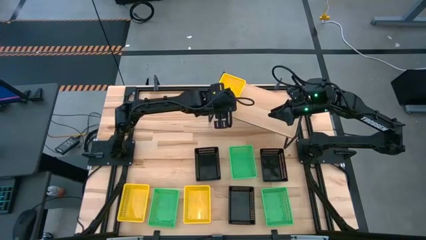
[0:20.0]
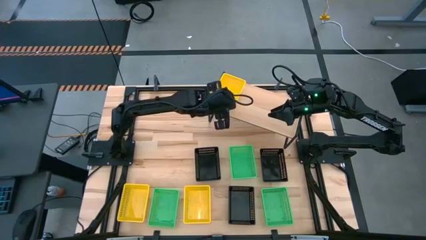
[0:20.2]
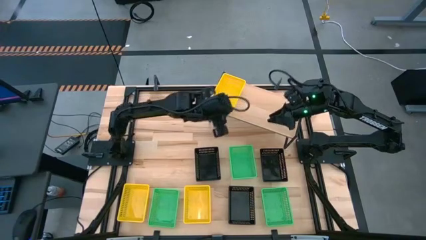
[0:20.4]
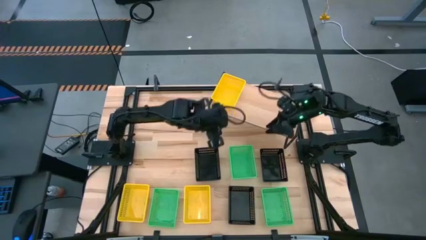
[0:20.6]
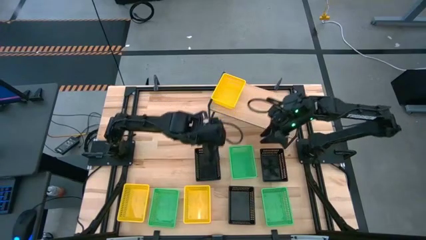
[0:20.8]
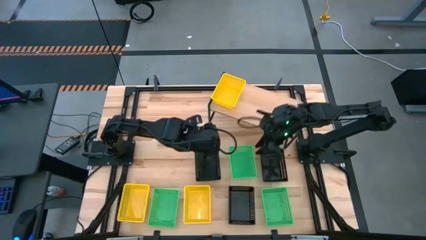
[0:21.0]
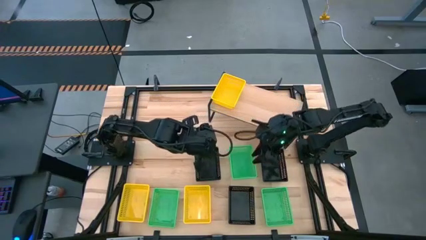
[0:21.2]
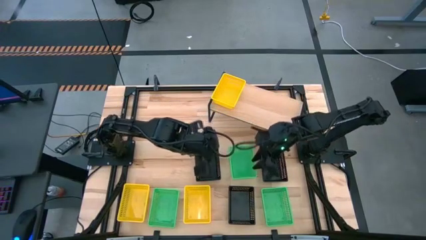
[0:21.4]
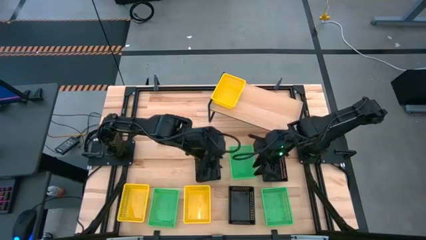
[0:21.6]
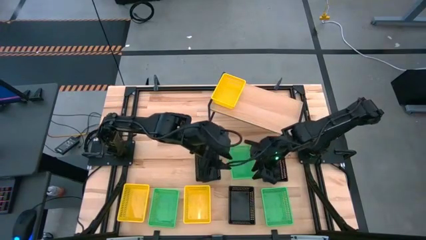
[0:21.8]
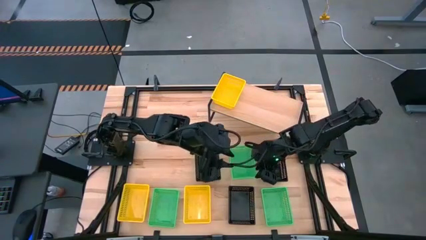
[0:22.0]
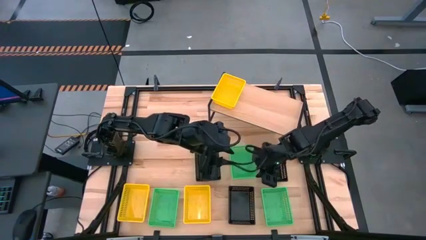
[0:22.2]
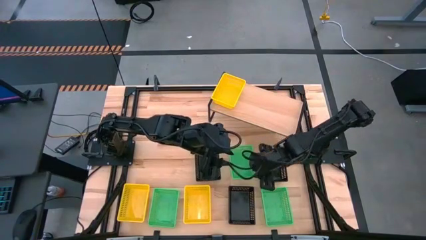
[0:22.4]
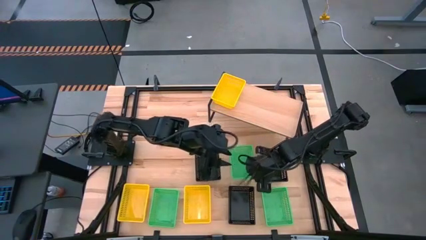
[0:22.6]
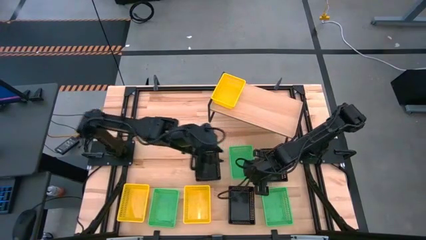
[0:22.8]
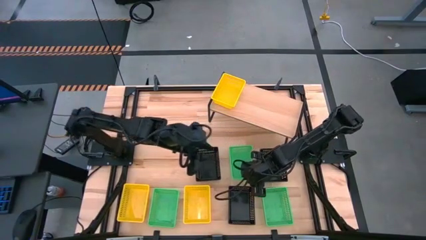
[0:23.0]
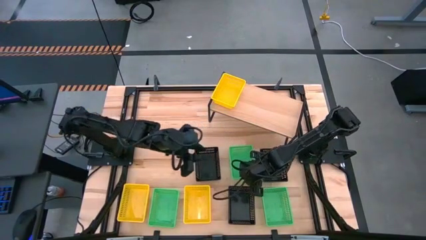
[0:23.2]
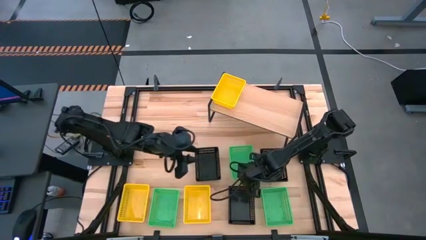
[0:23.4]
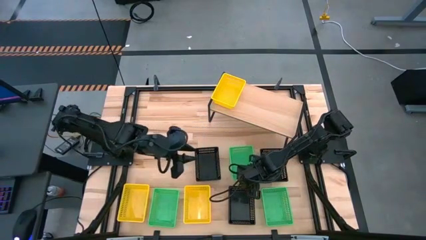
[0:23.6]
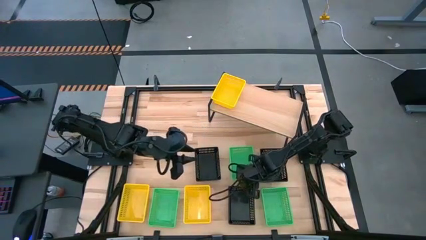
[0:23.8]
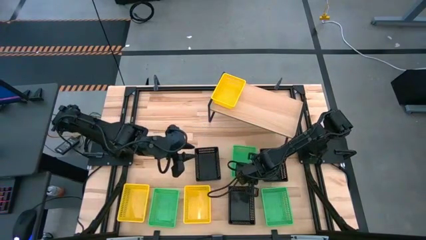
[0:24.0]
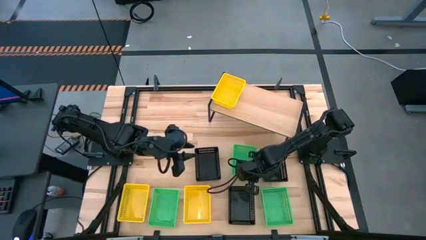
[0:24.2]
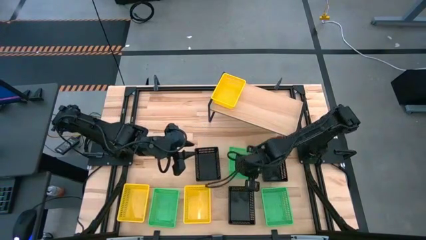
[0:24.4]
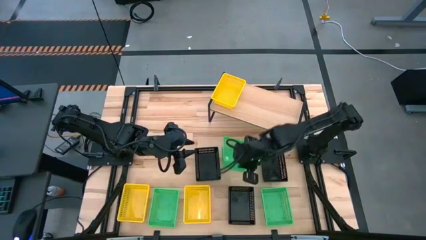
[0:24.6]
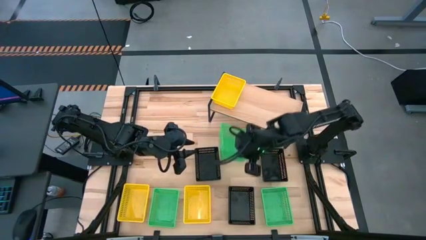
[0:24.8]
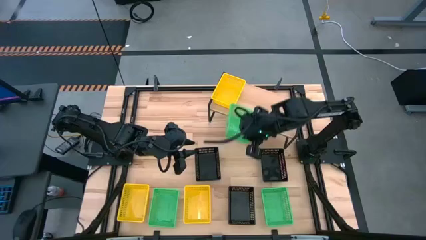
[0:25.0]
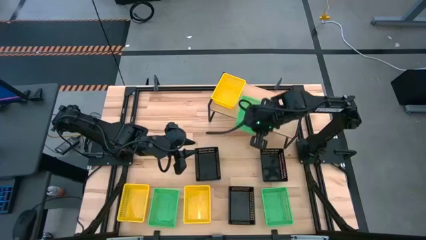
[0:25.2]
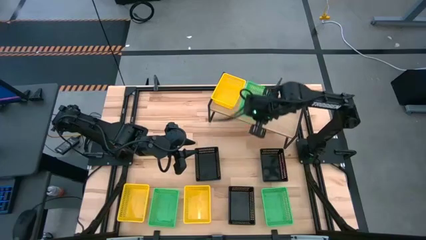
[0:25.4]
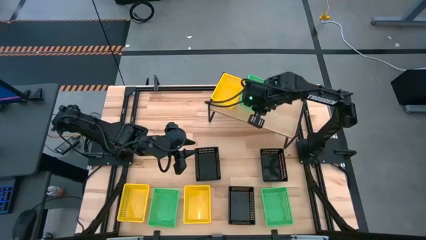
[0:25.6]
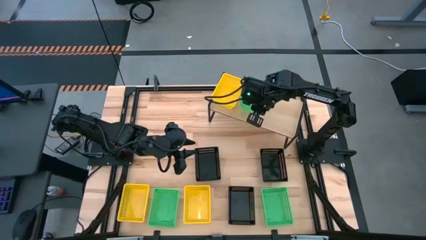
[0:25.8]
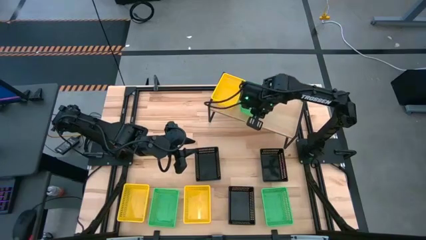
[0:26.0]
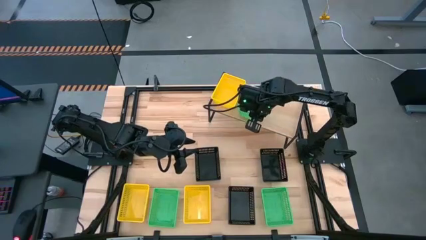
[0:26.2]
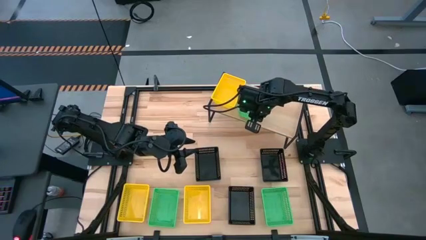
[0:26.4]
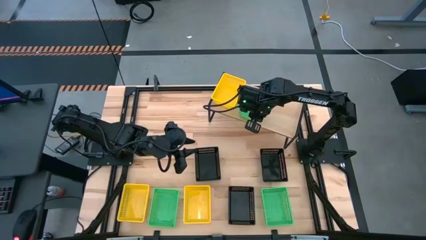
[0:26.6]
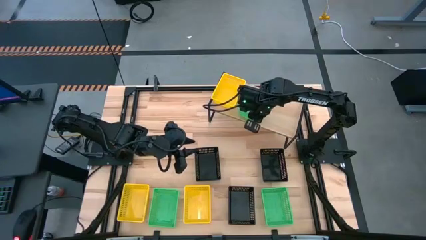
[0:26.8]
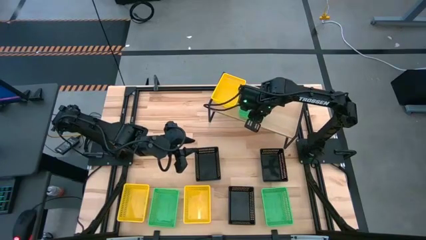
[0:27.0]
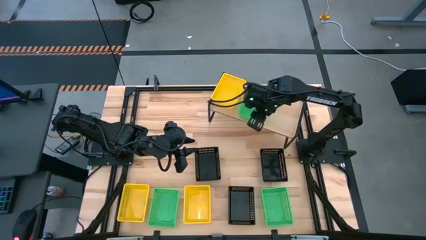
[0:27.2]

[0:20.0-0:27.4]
Task: Stack baskets on shelf by color
Put the top green bin on the shelf

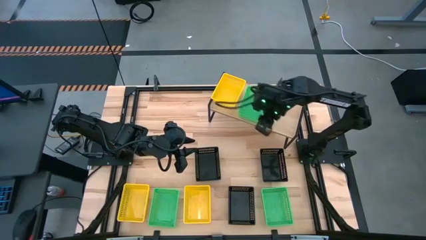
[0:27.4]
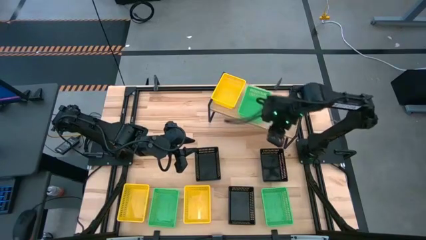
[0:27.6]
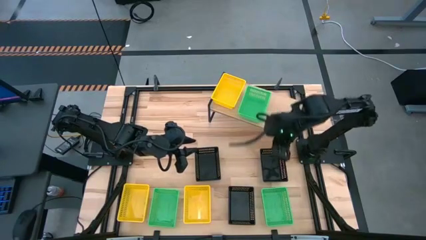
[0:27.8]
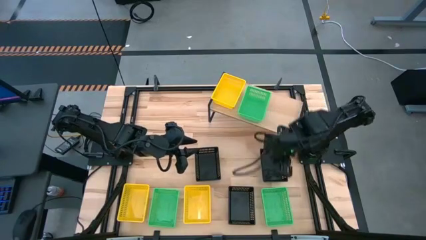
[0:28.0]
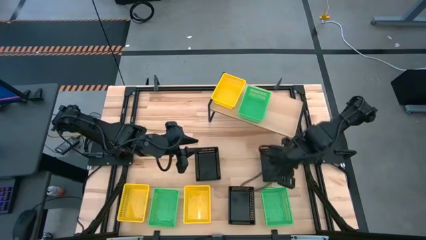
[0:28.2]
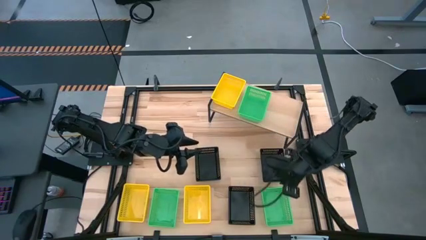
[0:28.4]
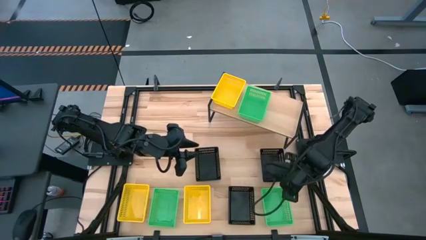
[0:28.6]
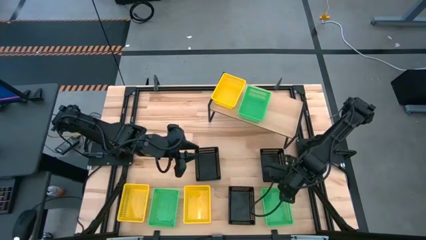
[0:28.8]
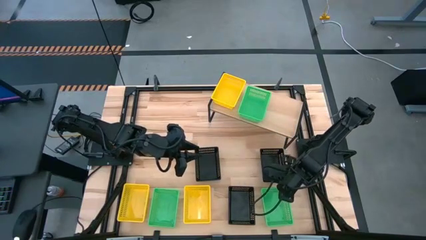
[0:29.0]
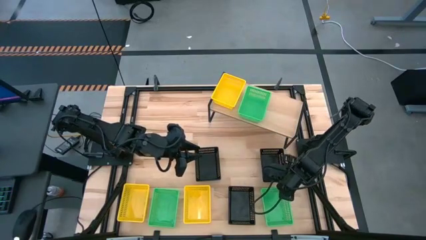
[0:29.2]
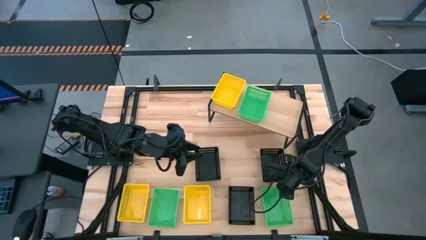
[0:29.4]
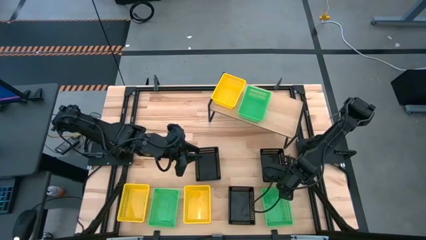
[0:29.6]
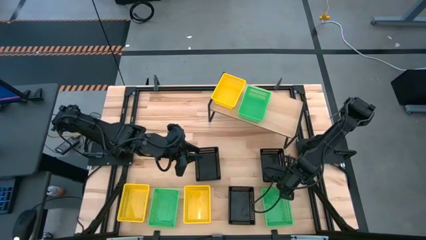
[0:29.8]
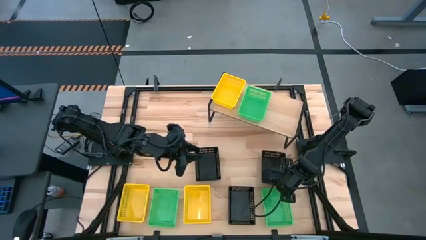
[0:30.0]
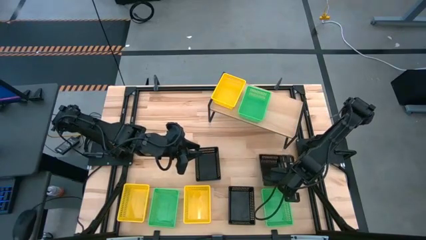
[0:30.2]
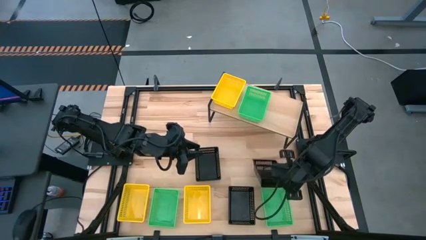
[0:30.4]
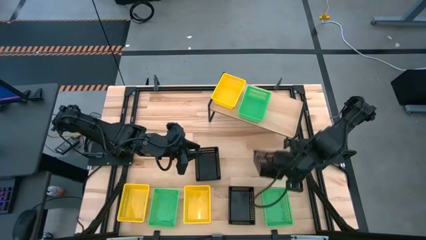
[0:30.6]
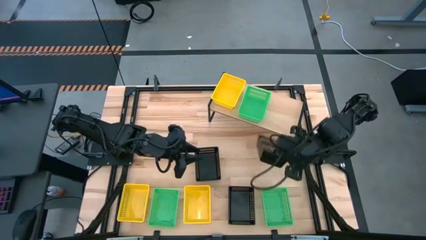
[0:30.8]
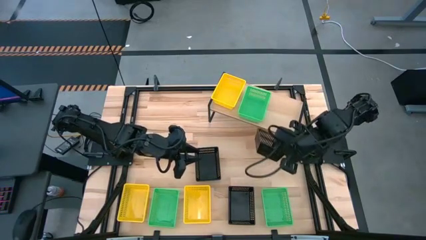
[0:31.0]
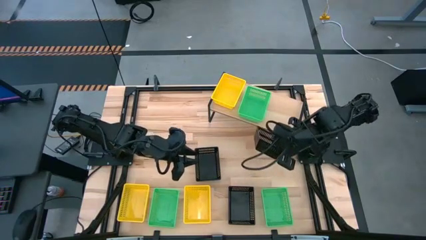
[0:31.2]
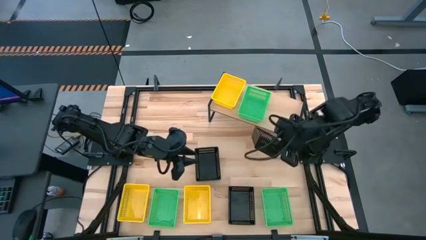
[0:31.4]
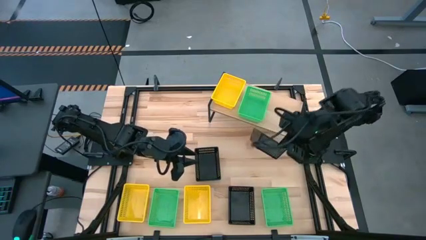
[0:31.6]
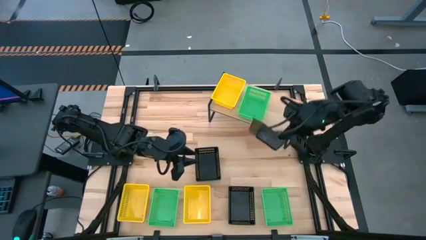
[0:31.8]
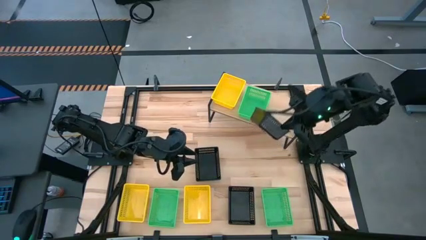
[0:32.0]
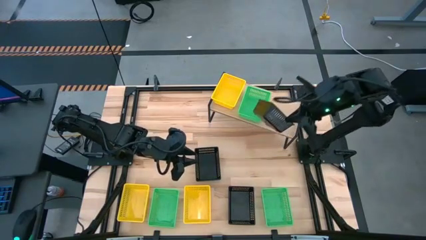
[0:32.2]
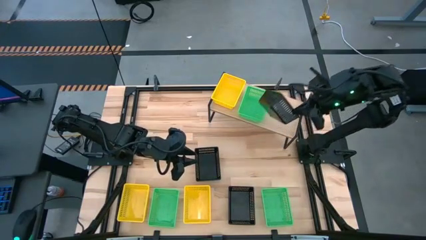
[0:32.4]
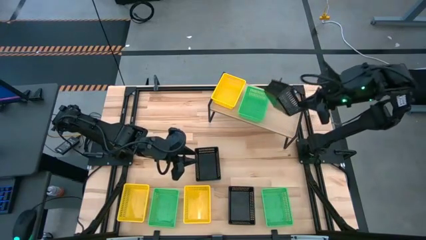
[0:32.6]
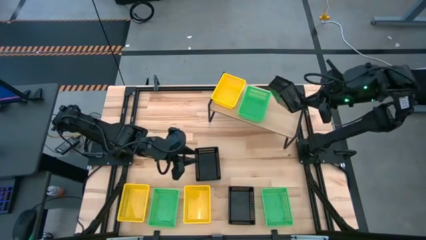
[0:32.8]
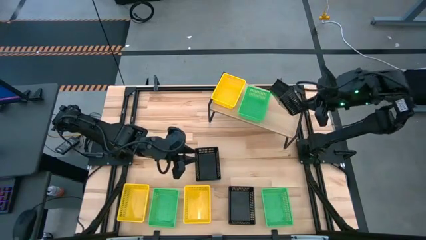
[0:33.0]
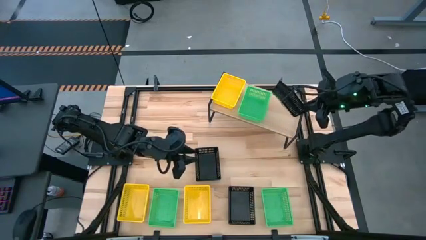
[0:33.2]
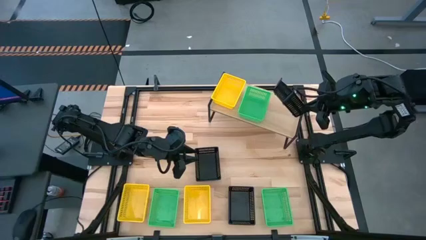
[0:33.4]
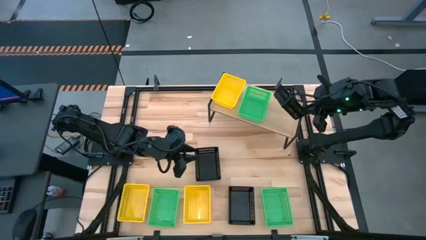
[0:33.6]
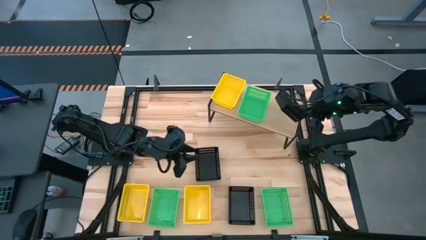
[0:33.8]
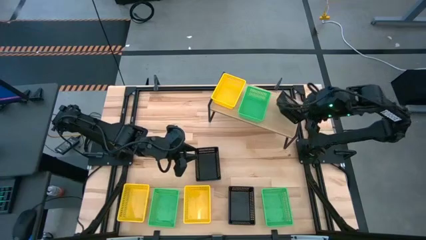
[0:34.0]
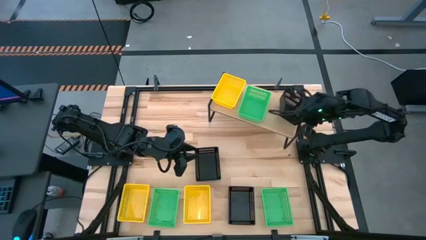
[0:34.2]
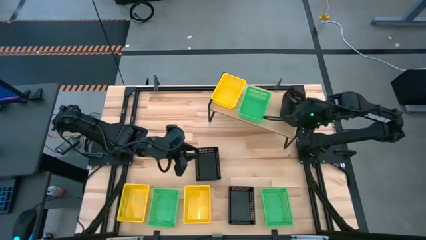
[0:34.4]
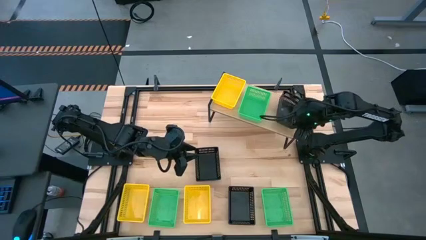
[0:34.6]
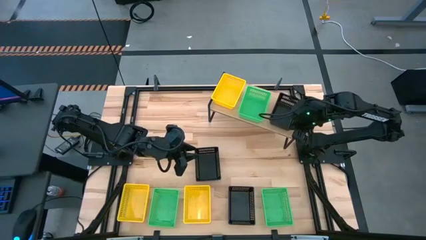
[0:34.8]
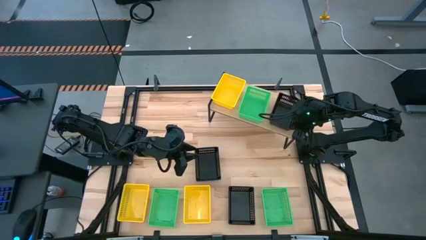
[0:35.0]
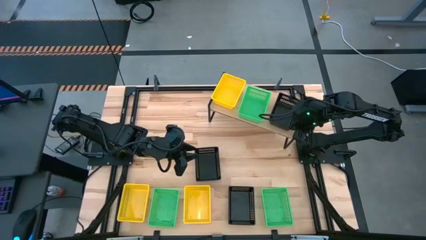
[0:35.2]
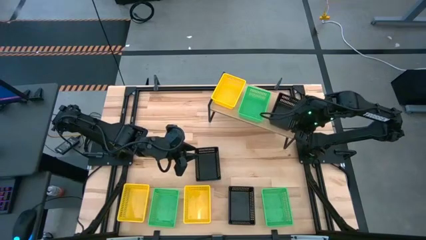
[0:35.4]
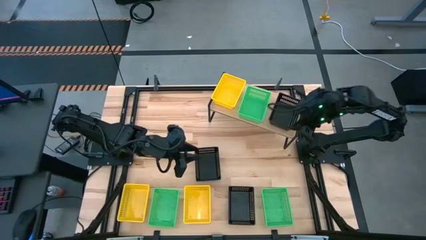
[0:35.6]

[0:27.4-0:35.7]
Put the top right black bin on the shelf
